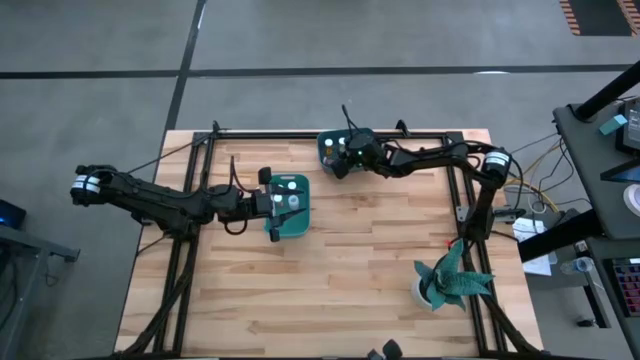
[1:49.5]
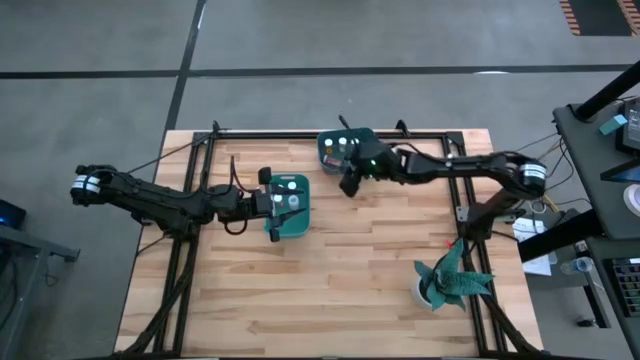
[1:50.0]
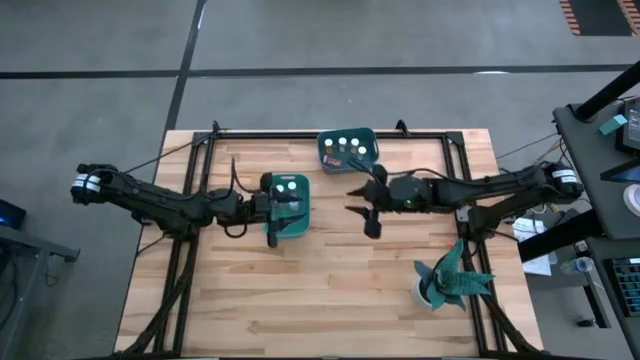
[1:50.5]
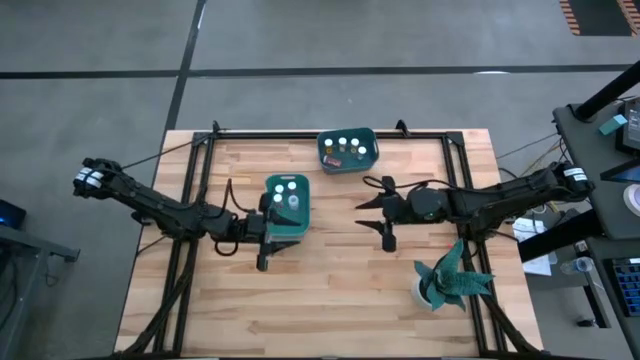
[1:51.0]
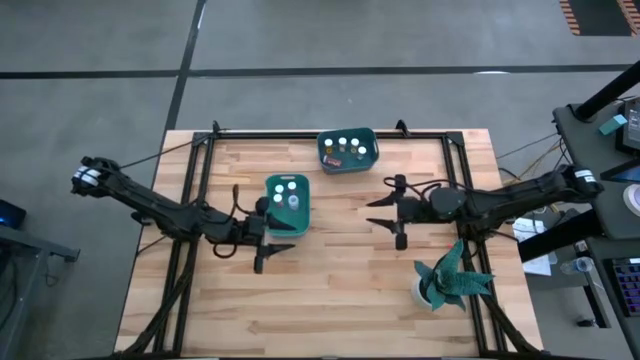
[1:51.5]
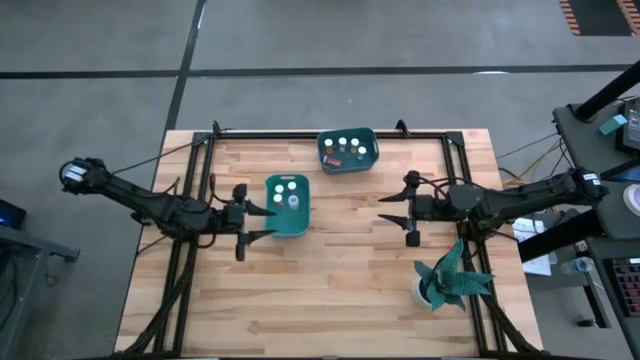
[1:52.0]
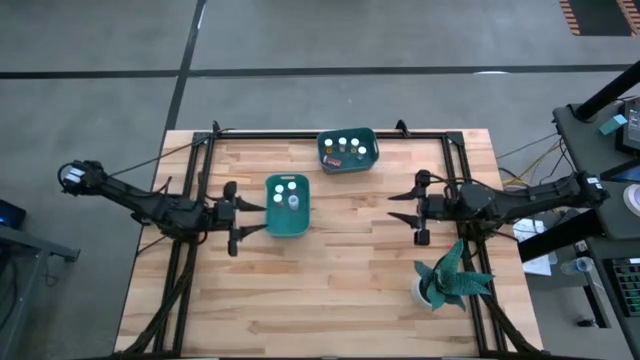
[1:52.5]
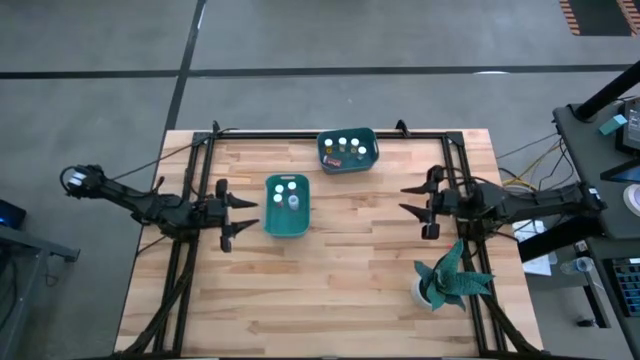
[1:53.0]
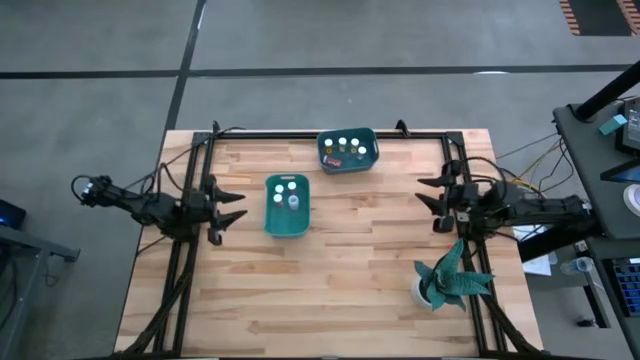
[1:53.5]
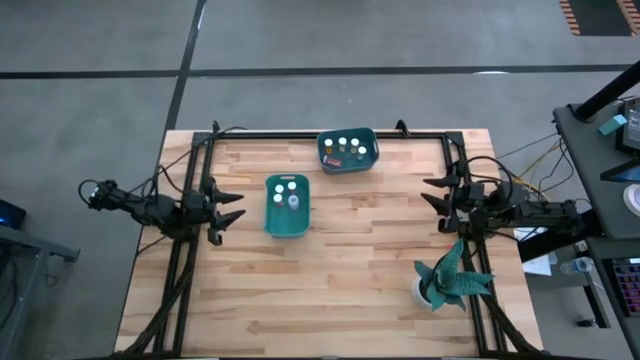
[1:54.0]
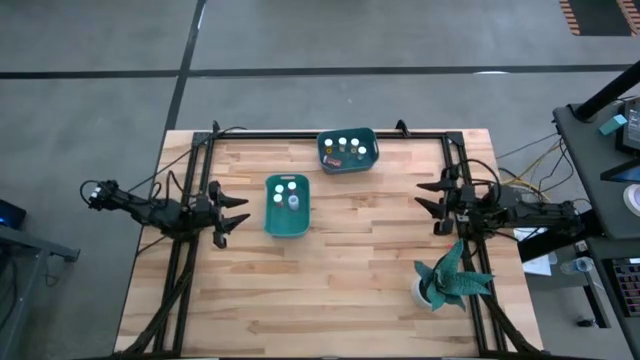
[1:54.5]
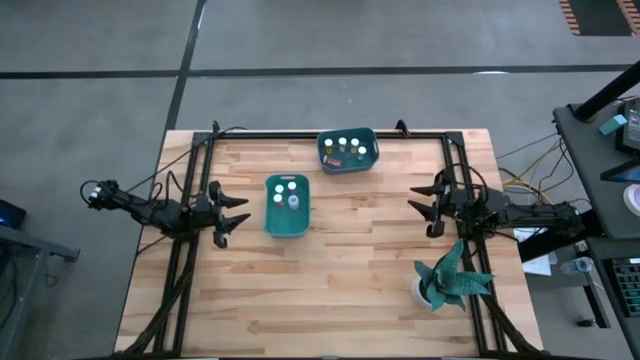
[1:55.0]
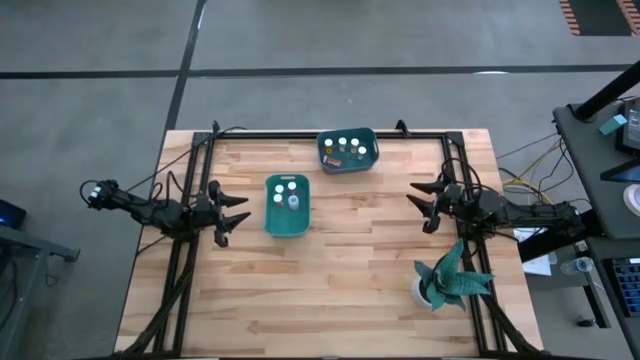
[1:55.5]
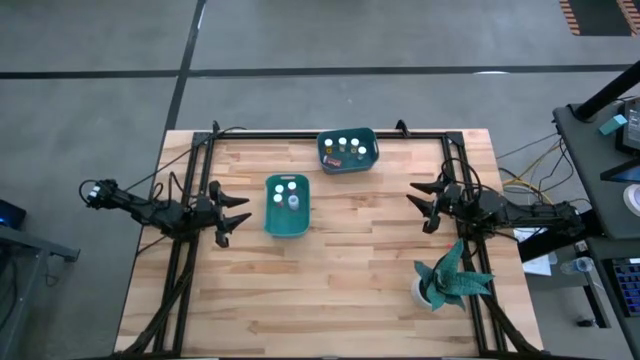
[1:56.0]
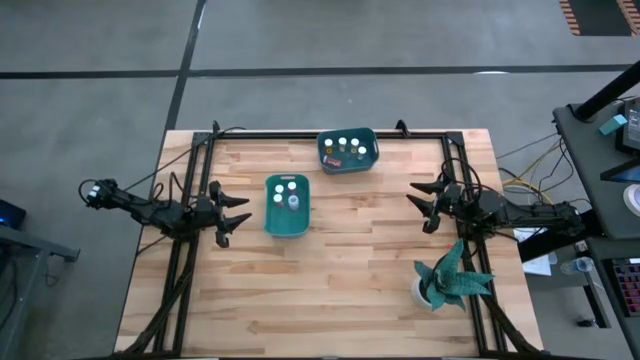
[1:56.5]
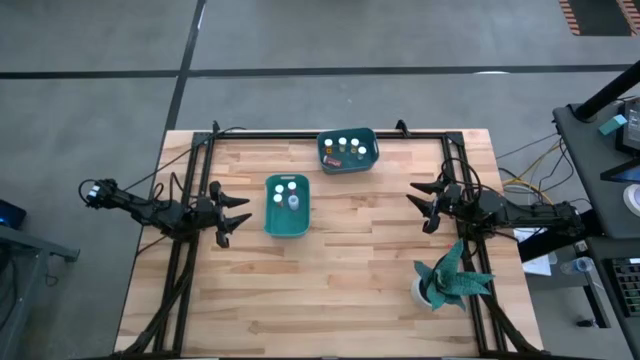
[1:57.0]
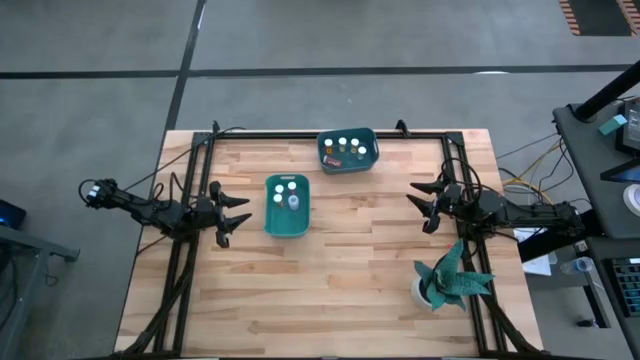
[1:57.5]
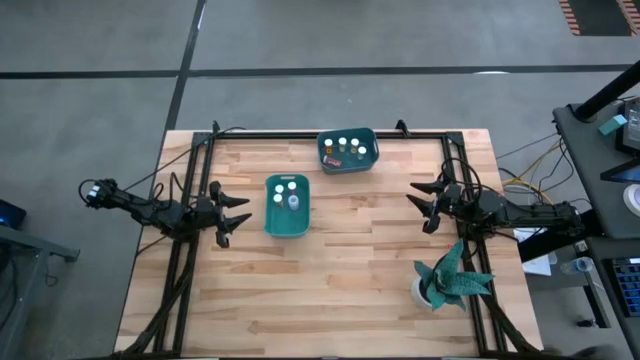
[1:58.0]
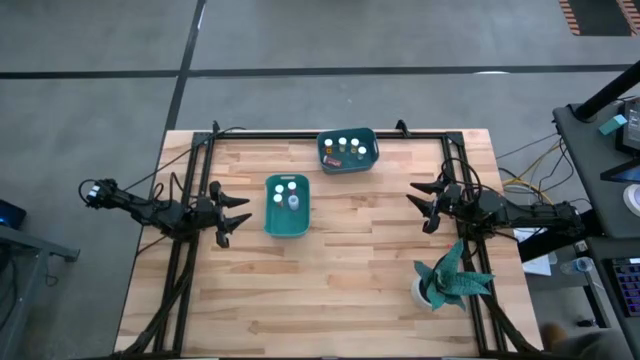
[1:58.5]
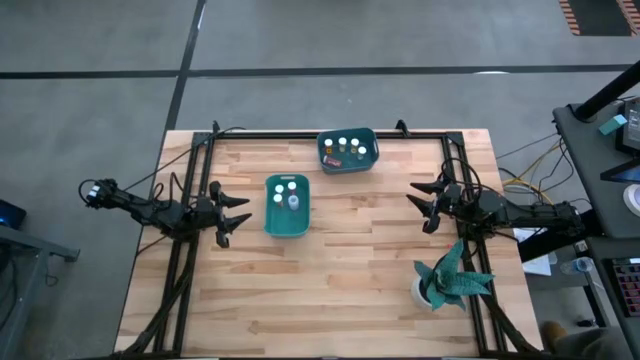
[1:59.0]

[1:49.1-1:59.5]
Task: Pick and place medicine bottles into bin by pill shape (circle, oval)
Return to Home Position

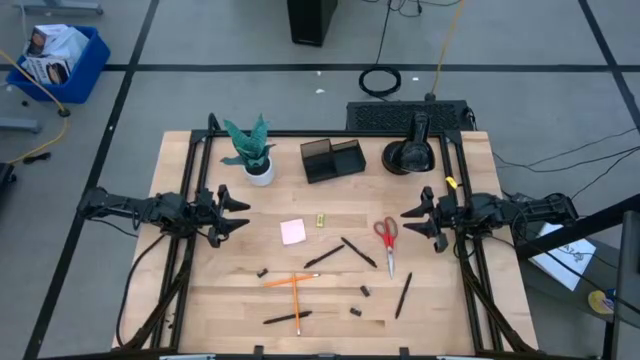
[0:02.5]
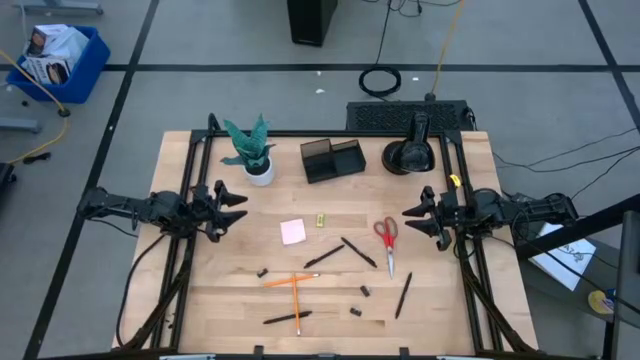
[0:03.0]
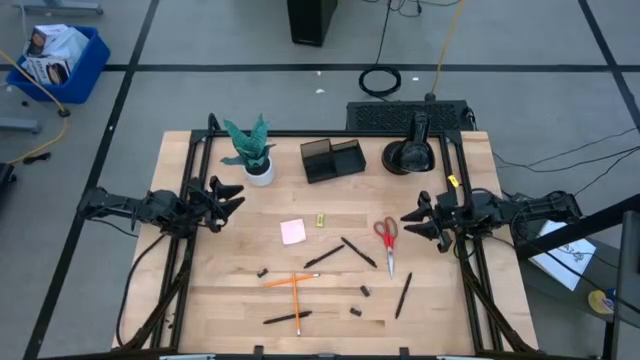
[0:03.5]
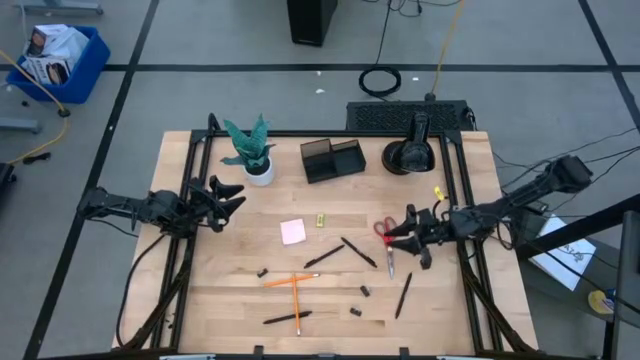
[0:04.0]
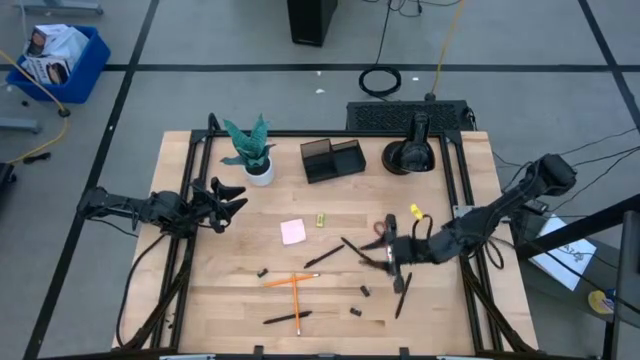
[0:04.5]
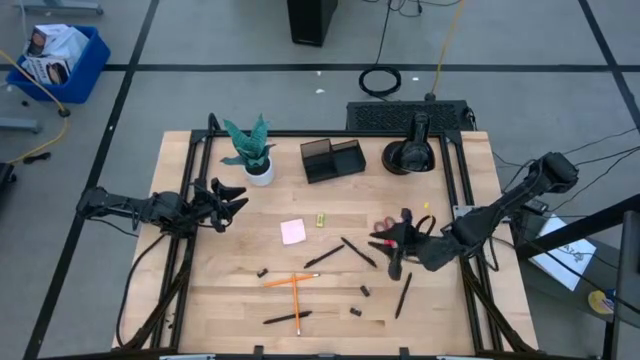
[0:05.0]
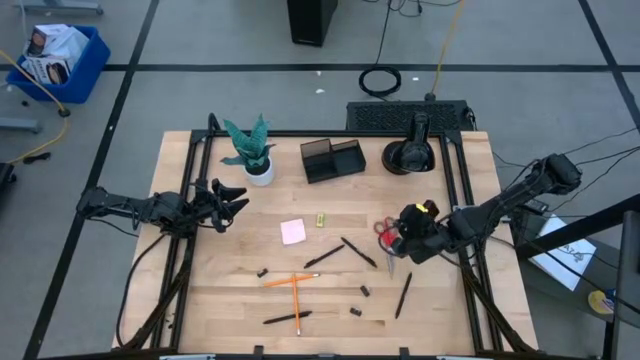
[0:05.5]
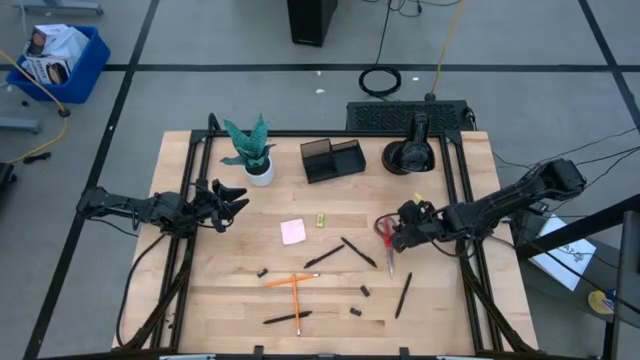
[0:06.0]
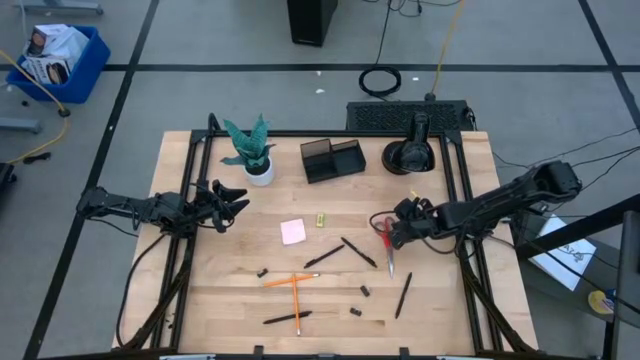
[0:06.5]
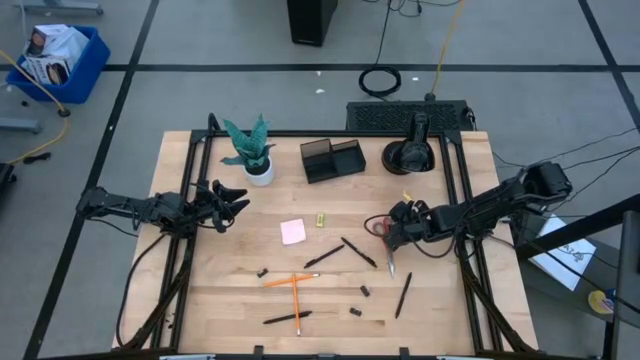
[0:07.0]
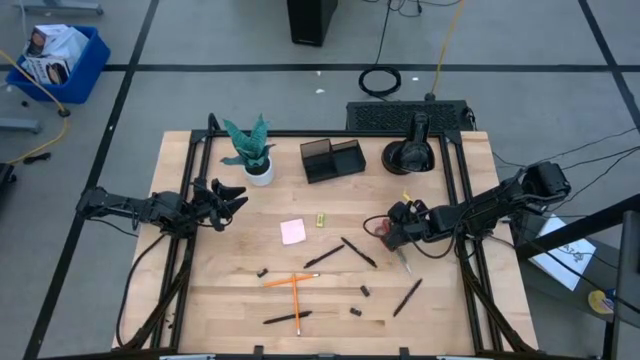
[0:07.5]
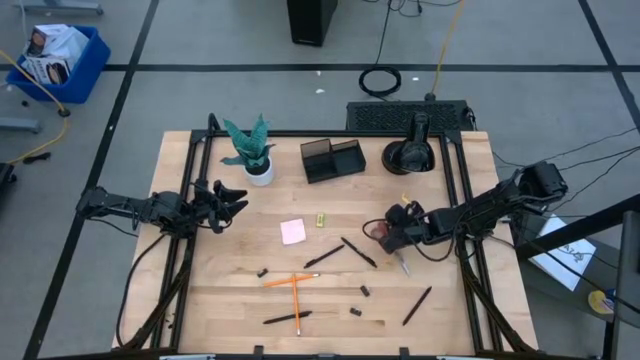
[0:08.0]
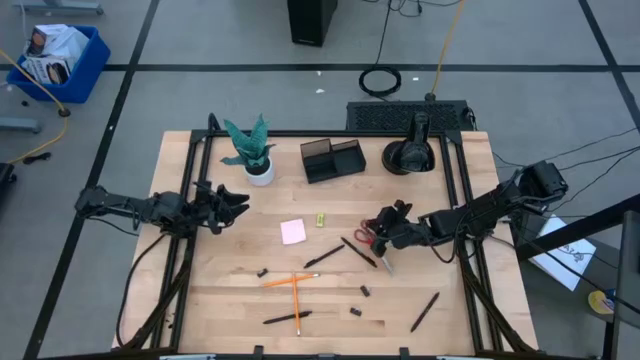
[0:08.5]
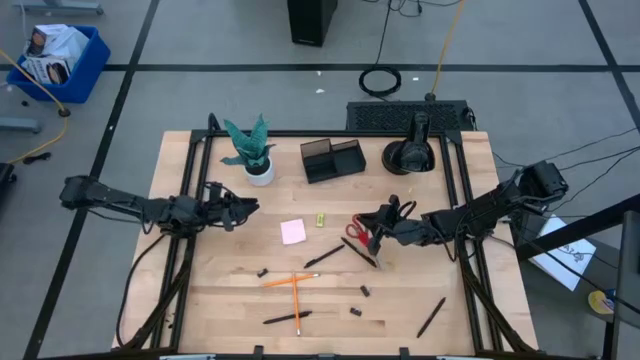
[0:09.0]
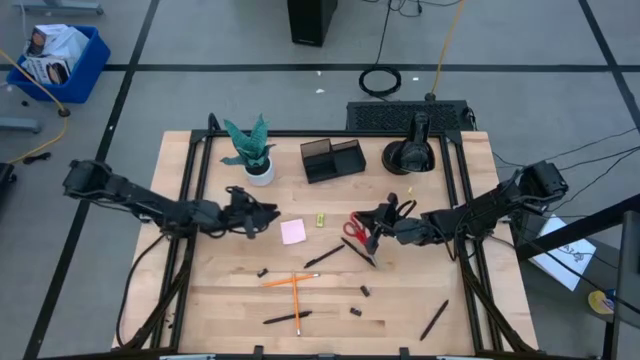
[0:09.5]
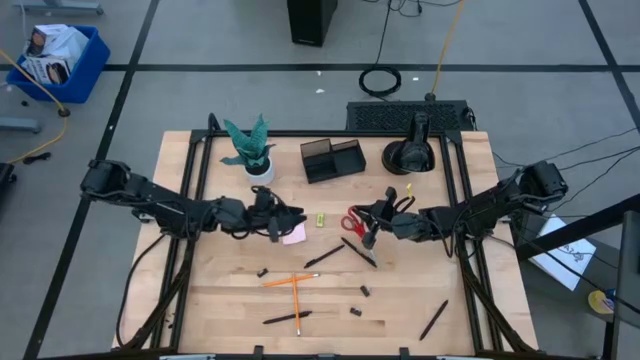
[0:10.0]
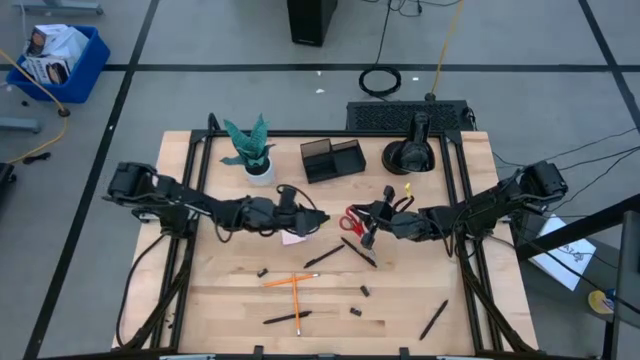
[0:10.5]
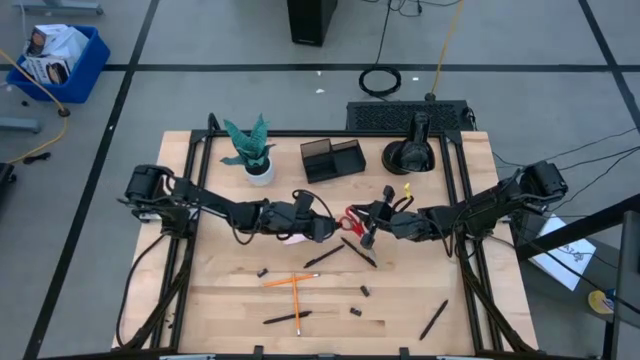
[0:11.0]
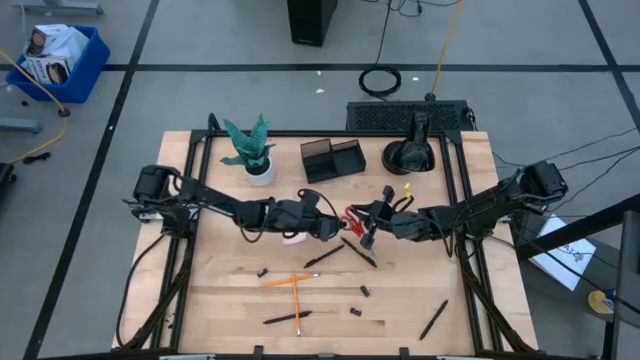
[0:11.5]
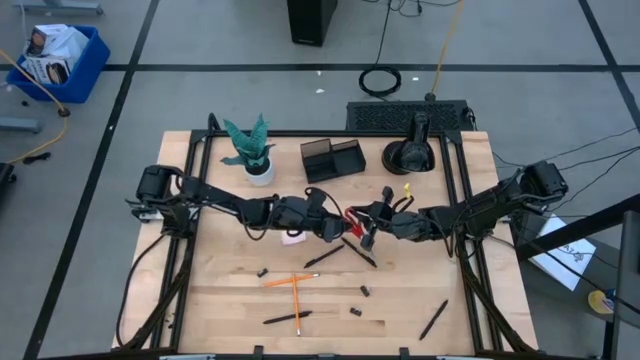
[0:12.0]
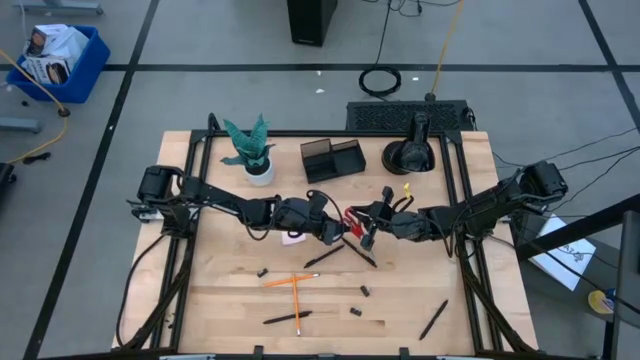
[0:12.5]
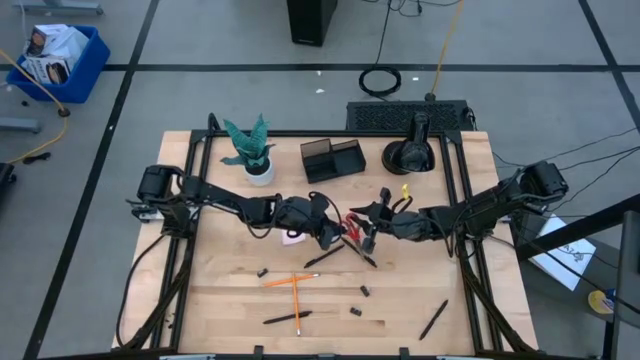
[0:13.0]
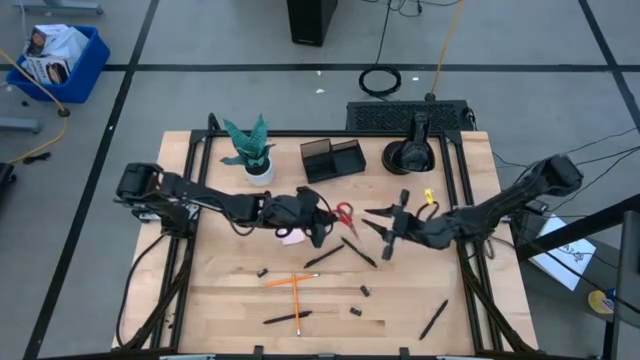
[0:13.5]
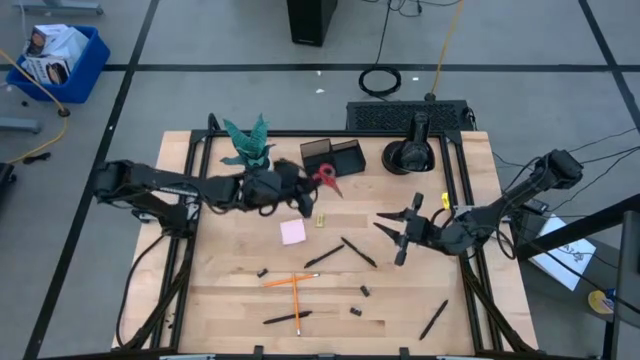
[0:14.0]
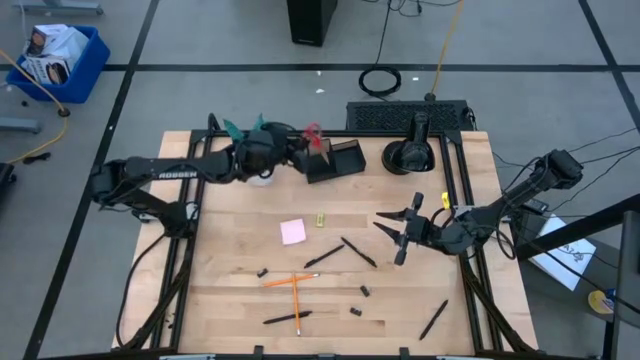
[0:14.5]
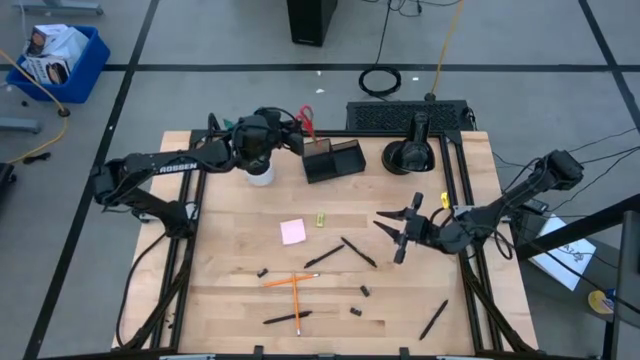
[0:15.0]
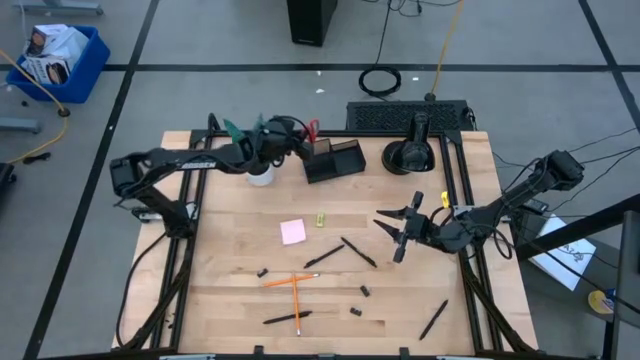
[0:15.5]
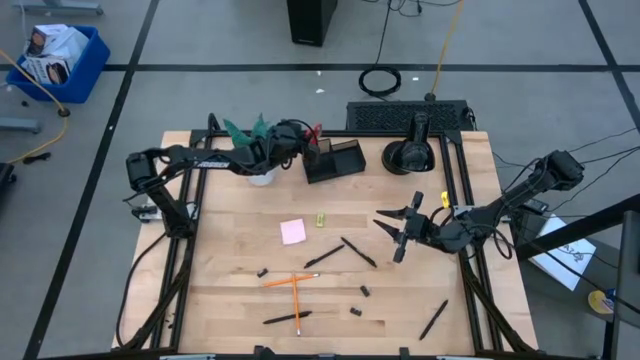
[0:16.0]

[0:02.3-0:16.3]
Task: Pick and place office supplies into organizer
Put the orange scissor into the black mesh desk organizer
